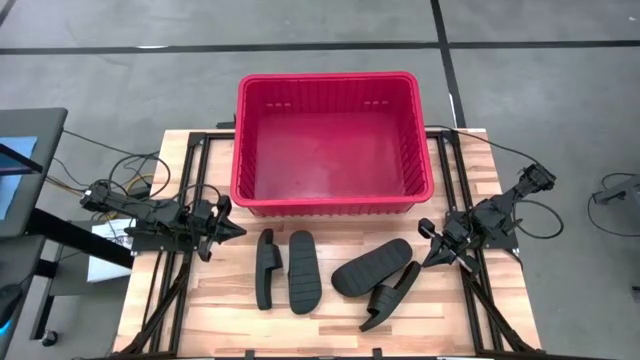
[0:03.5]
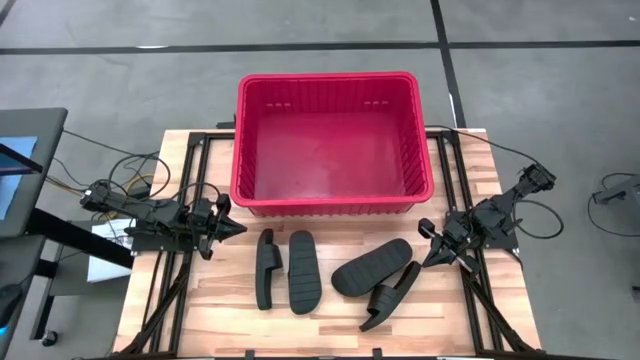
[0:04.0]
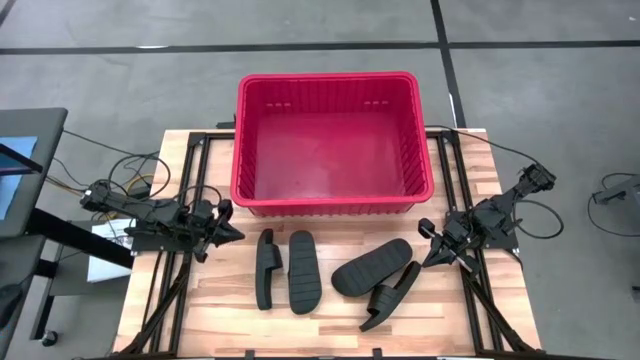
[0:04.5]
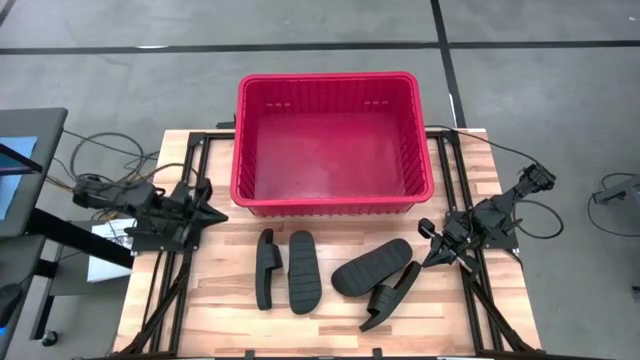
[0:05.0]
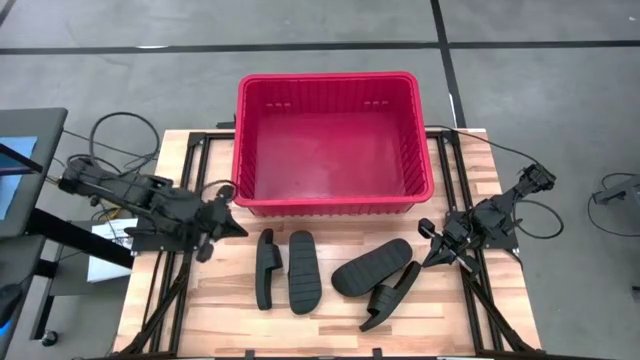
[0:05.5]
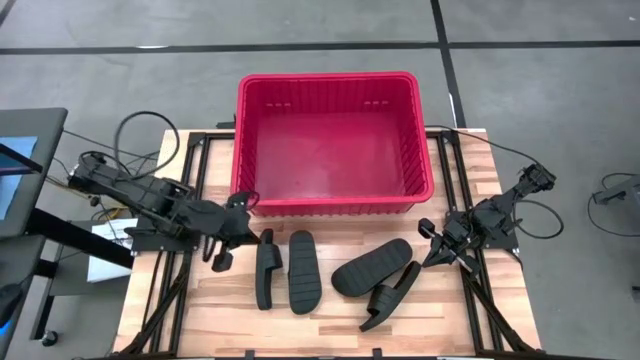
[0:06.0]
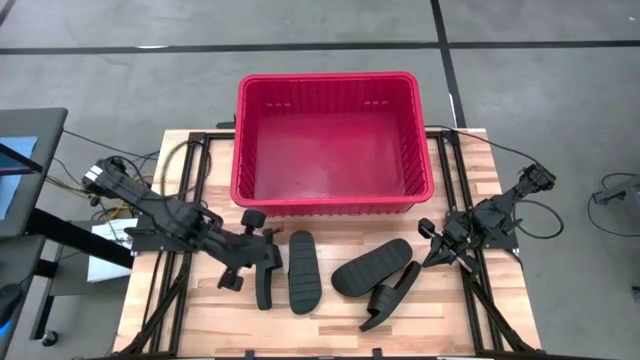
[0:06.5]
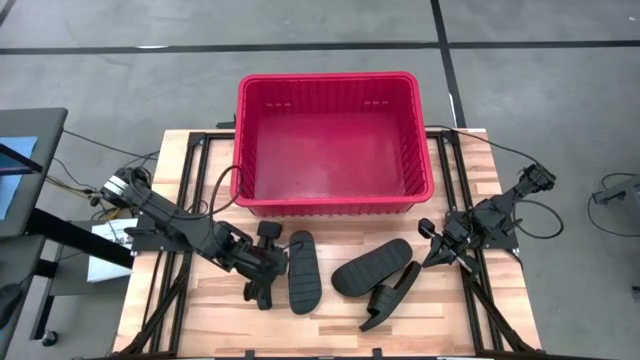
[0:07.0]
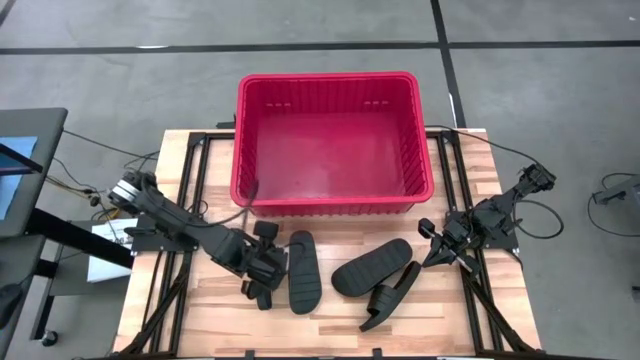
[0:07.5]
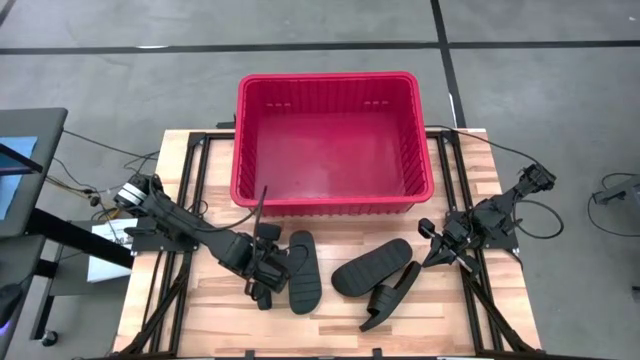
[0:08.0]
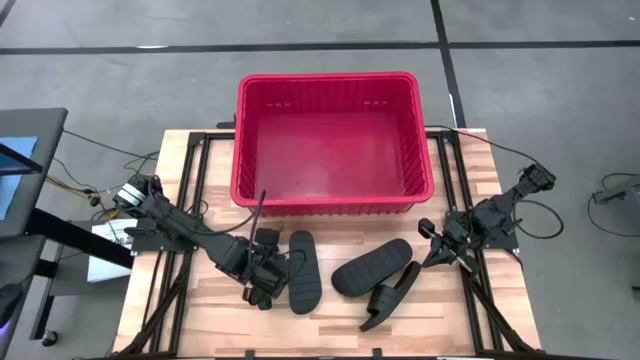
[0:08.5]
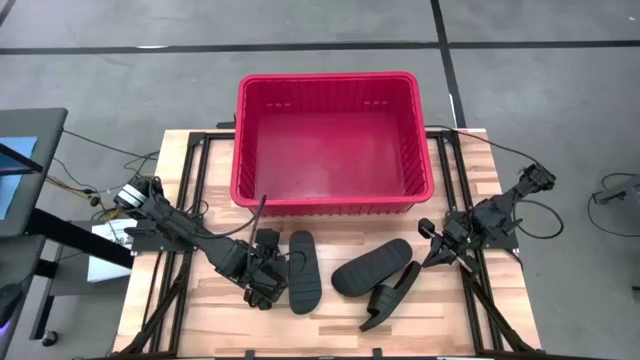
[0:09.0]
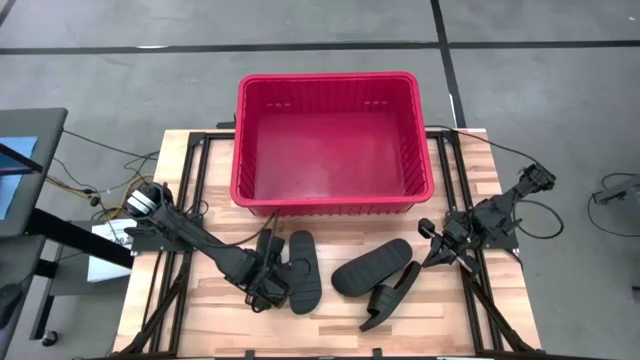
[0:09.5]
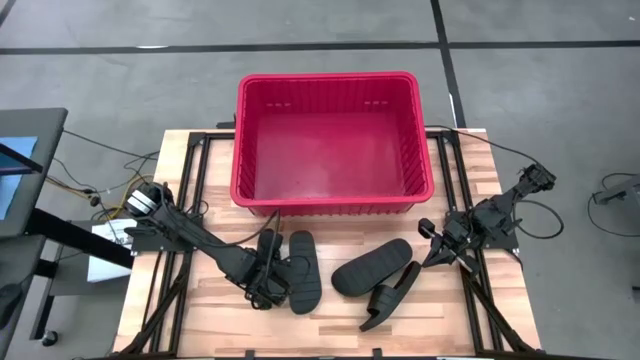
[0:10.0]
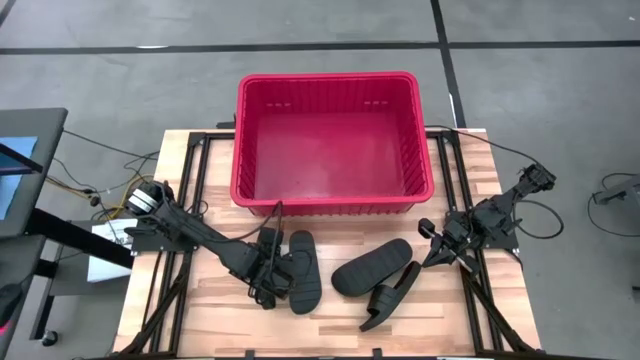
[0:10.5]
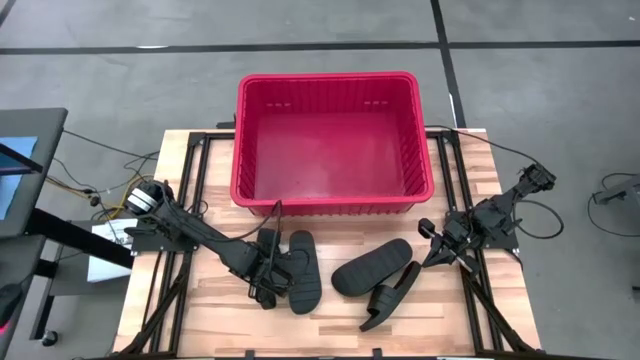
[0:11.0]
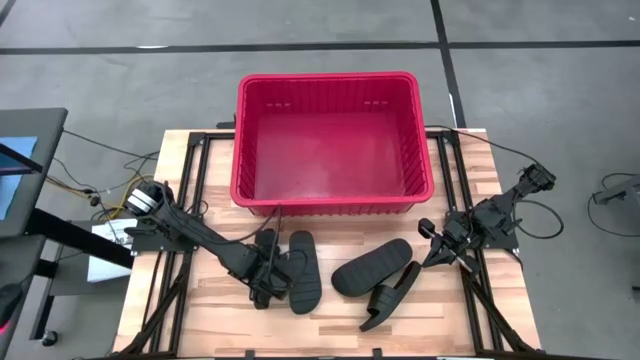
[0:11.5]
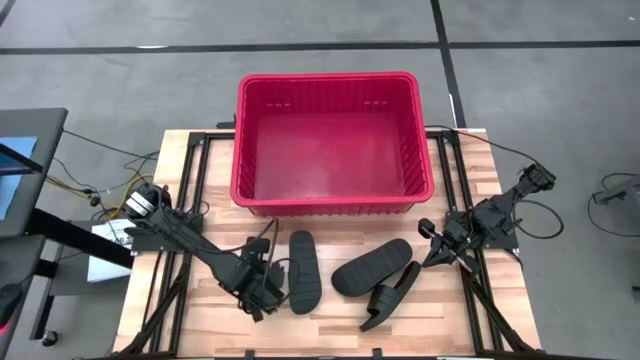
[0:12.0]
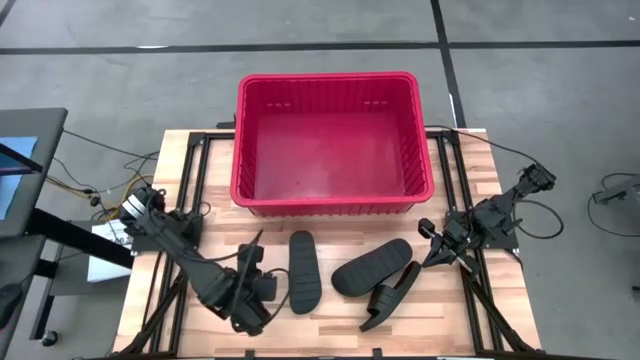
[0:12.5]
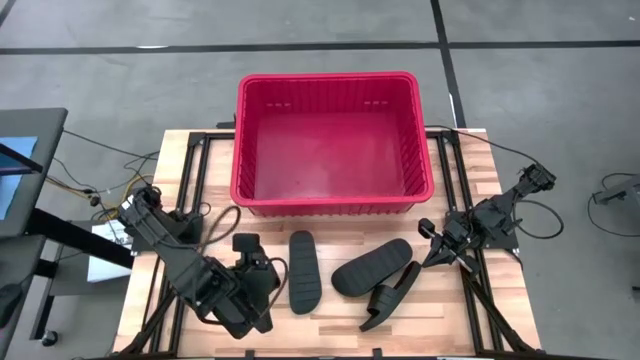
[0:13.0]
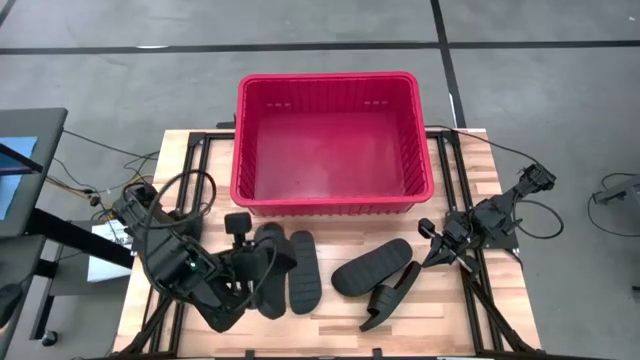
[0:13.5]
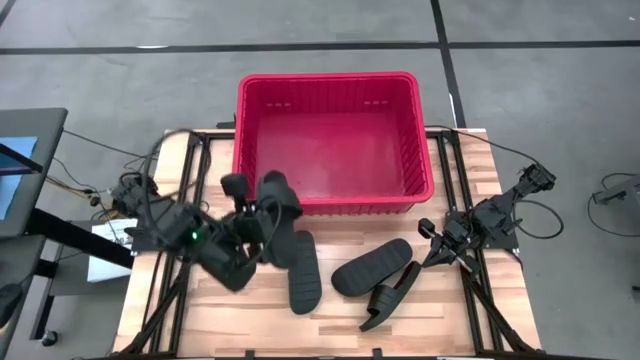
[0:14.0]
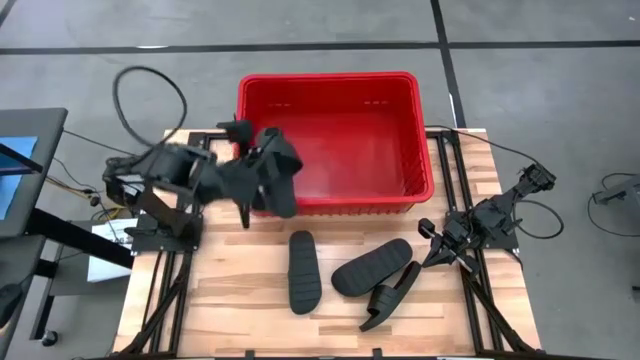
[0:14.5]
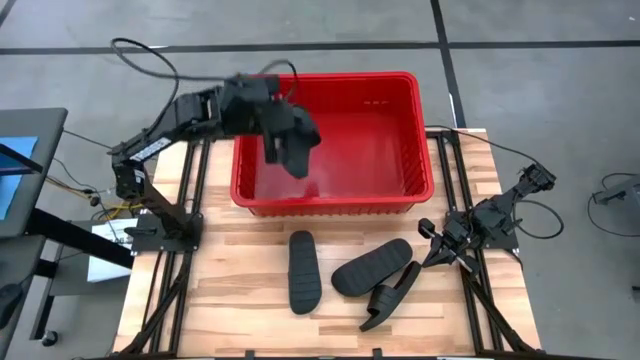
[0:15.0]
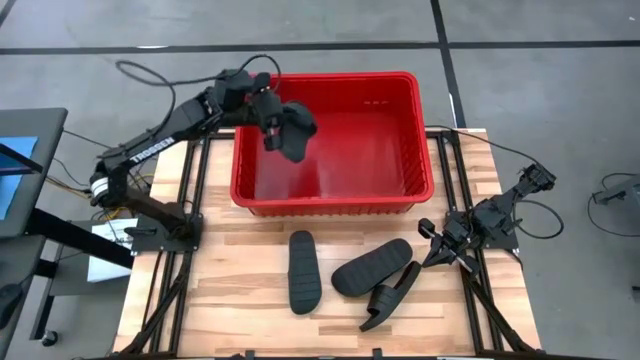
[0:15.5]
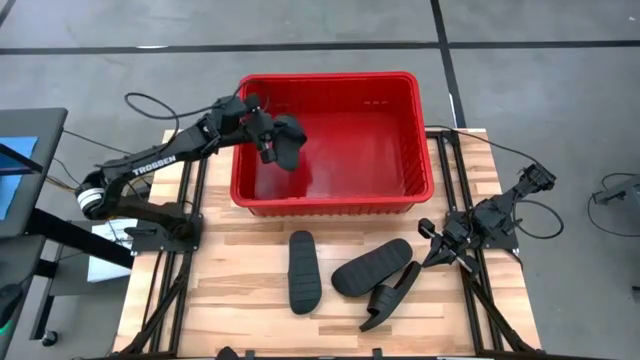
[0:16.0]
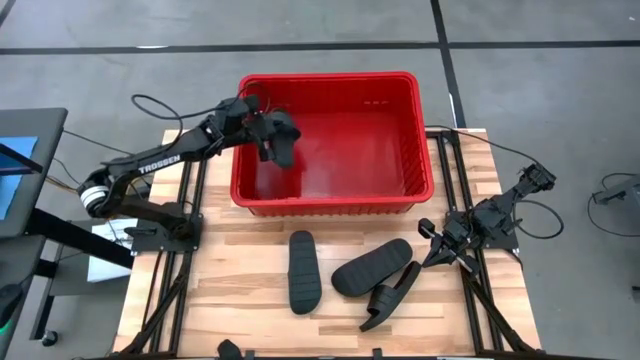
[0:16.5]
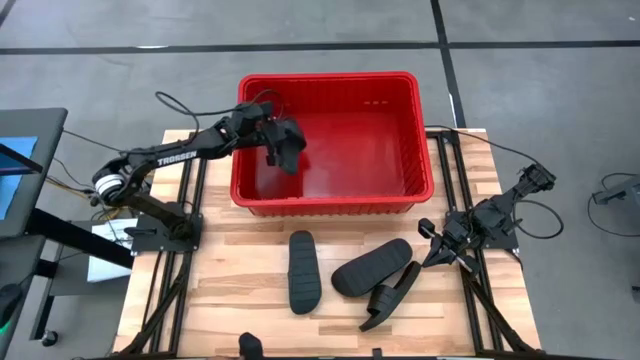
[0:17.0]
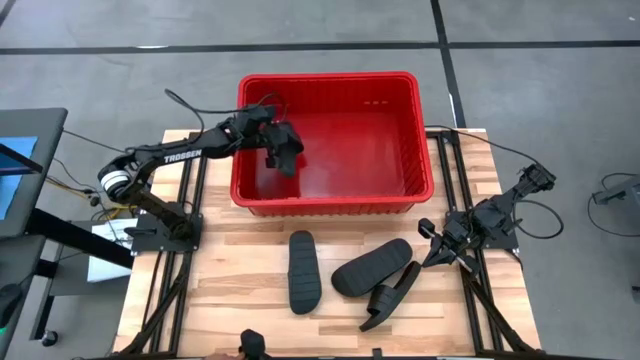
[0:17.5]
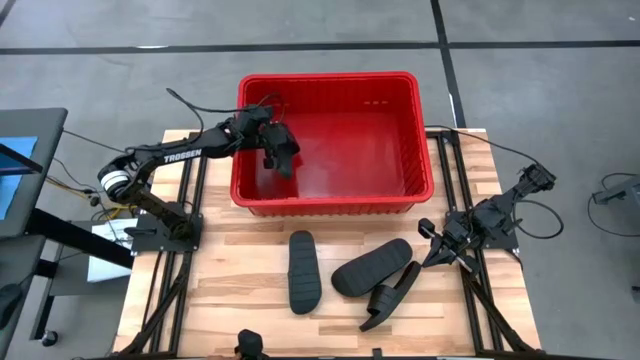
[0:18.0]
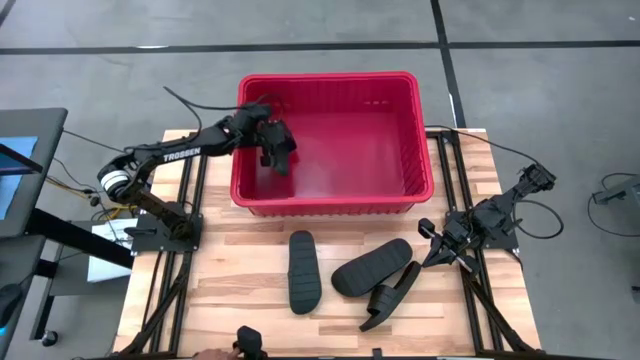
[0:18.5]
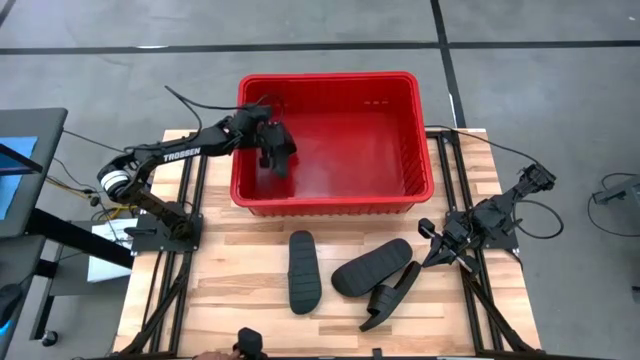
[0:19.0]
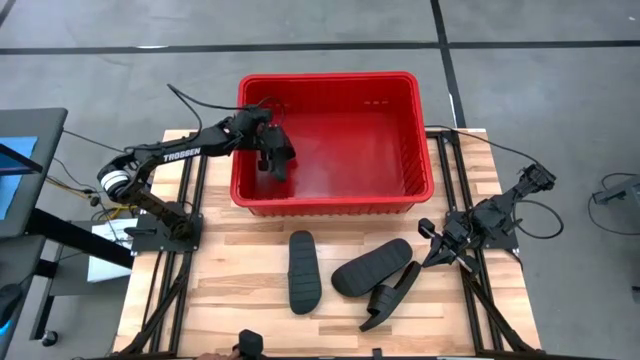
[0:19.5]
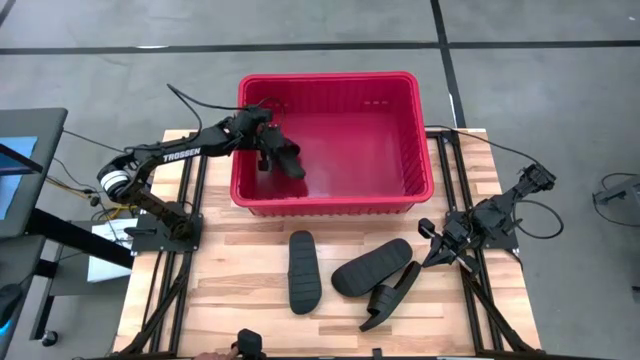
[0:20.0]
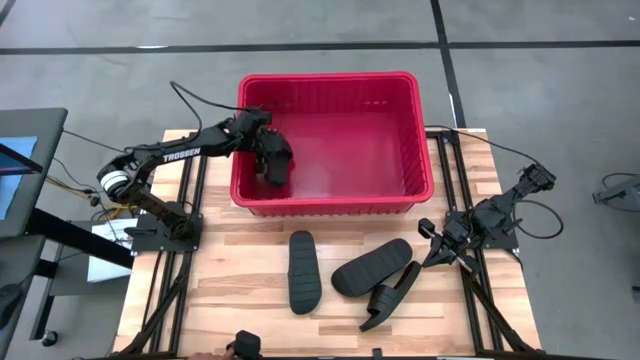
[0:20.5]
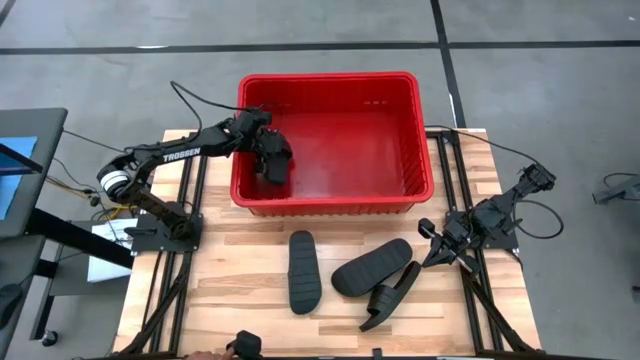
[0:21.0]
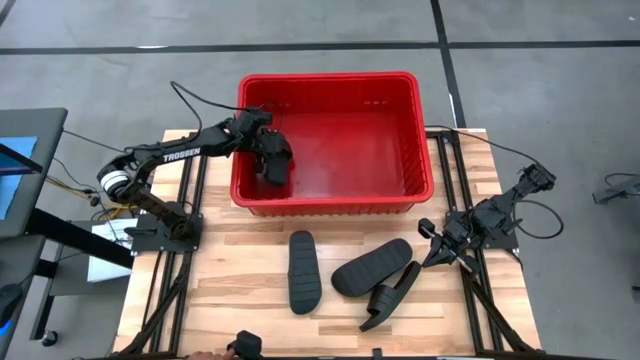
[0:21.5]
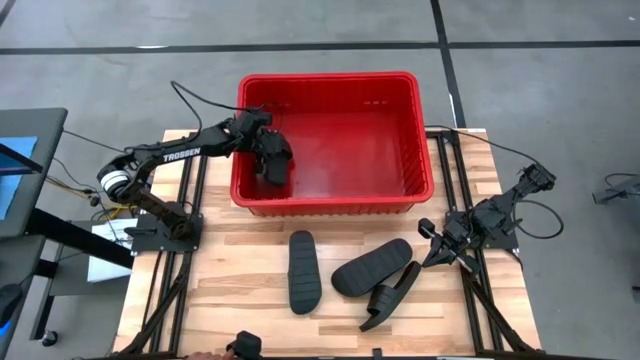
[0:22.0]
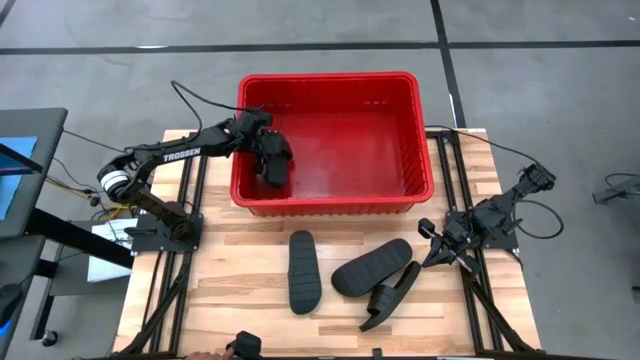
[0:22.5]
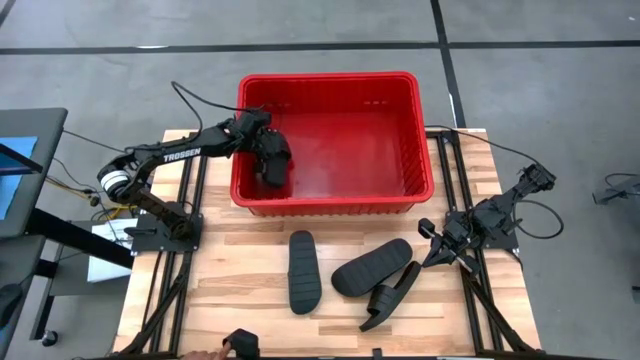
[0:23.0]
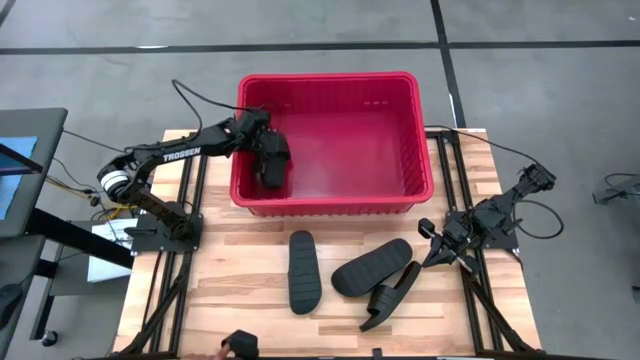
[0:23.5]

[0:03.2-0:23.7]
Task: Pick and place slides into bin
Put the black slides into the red bin
